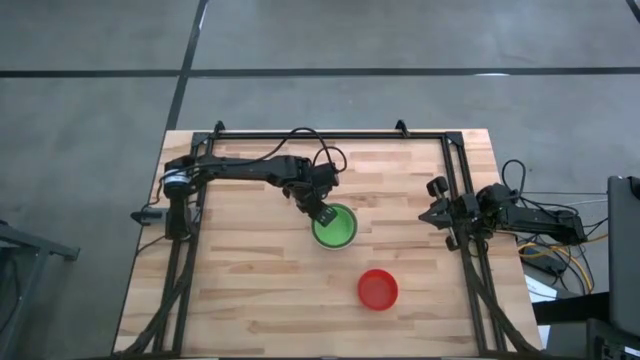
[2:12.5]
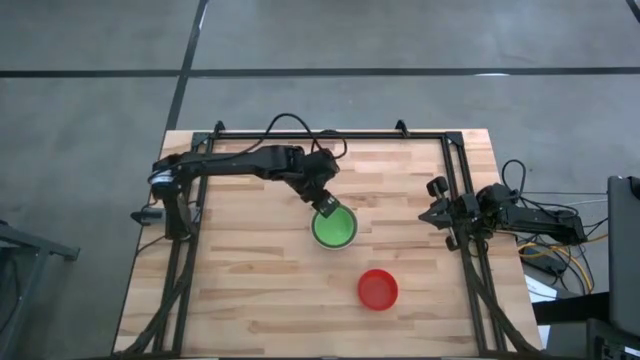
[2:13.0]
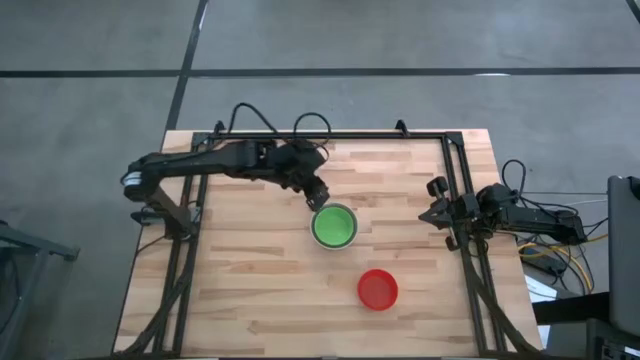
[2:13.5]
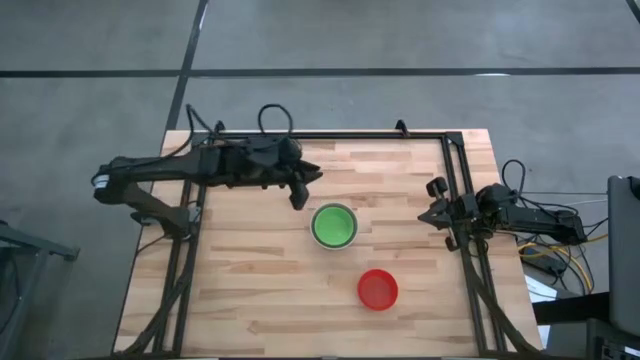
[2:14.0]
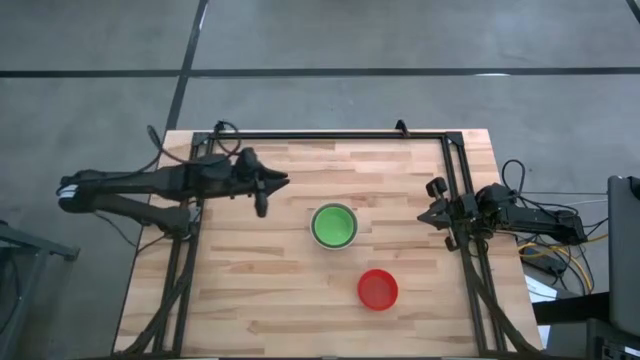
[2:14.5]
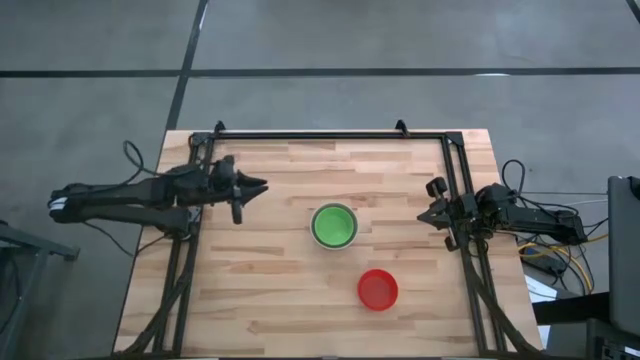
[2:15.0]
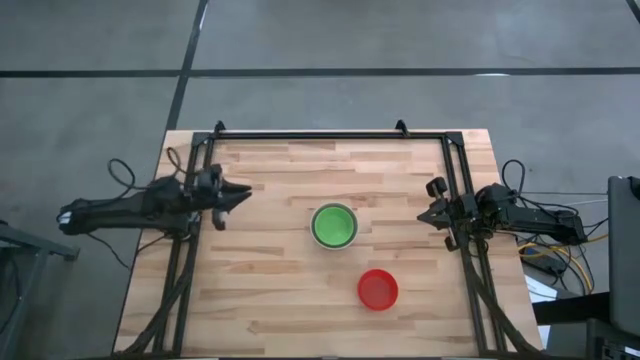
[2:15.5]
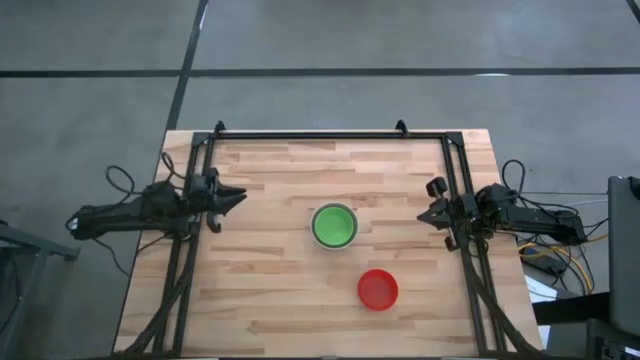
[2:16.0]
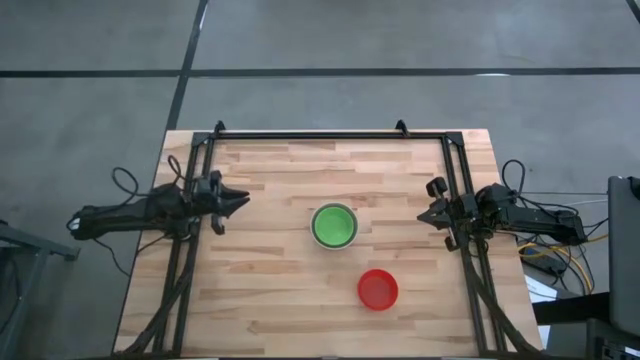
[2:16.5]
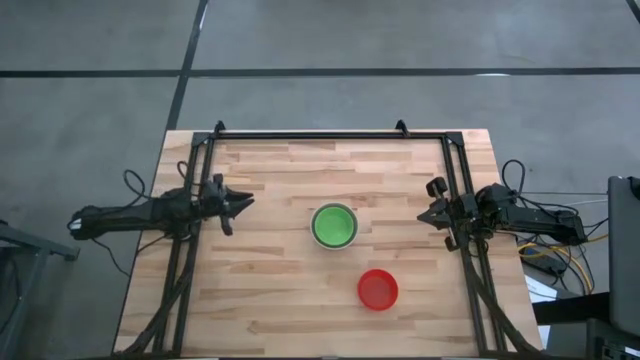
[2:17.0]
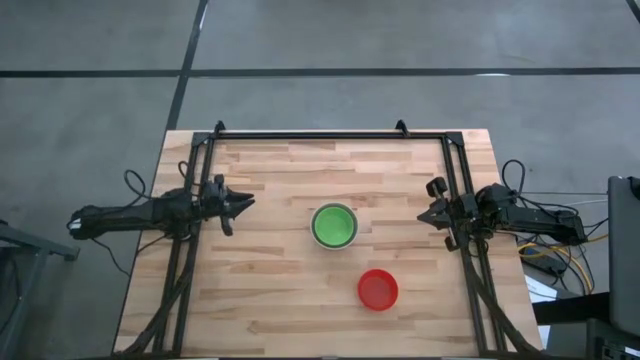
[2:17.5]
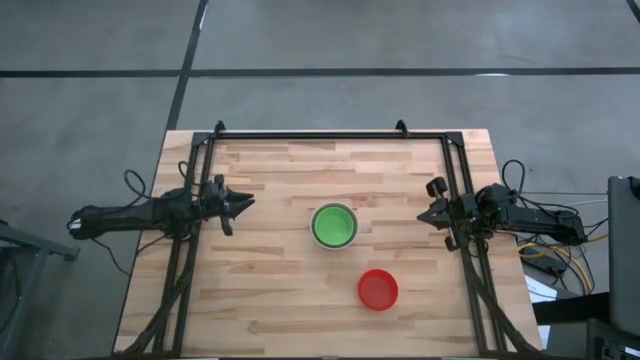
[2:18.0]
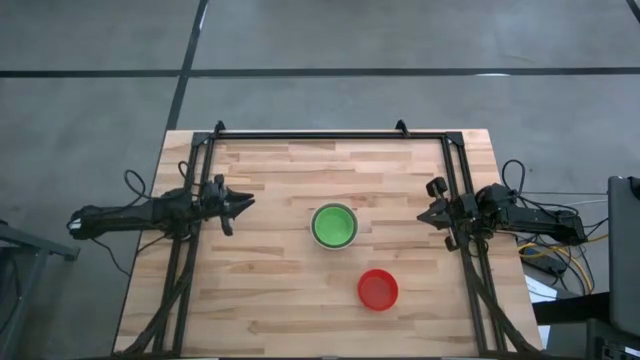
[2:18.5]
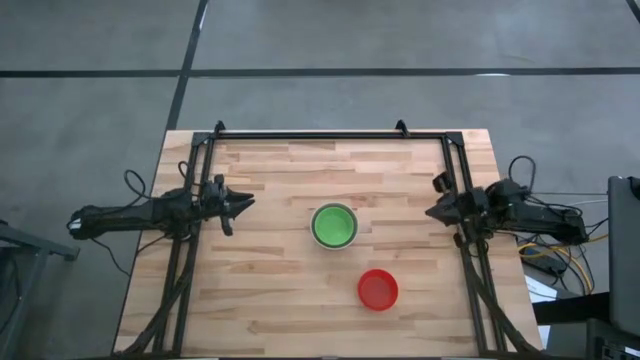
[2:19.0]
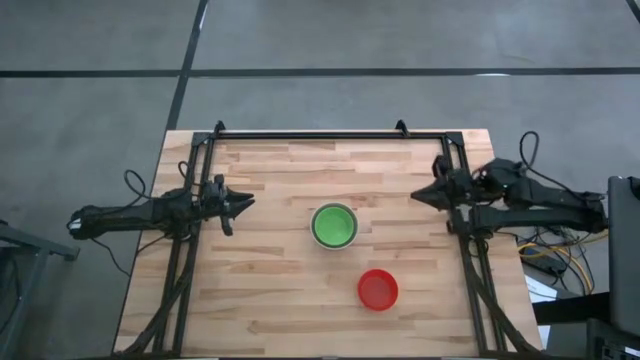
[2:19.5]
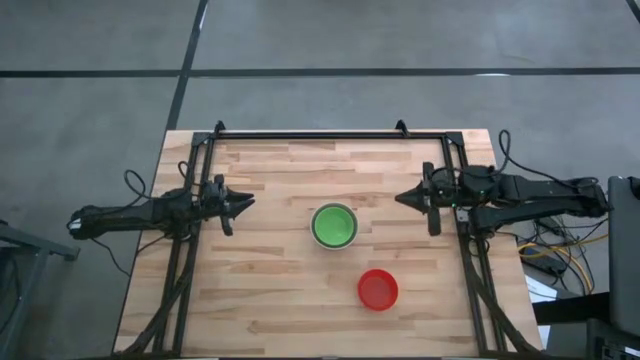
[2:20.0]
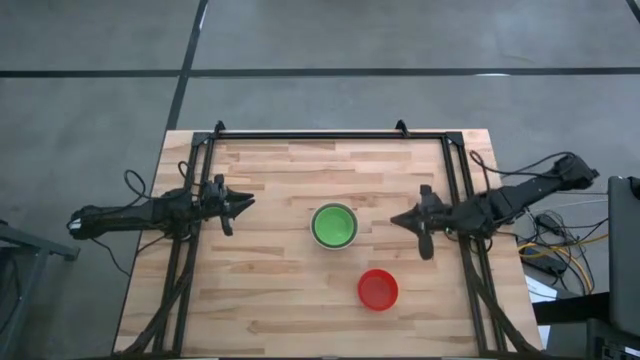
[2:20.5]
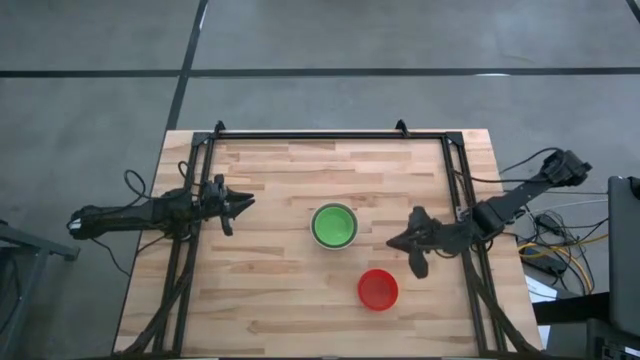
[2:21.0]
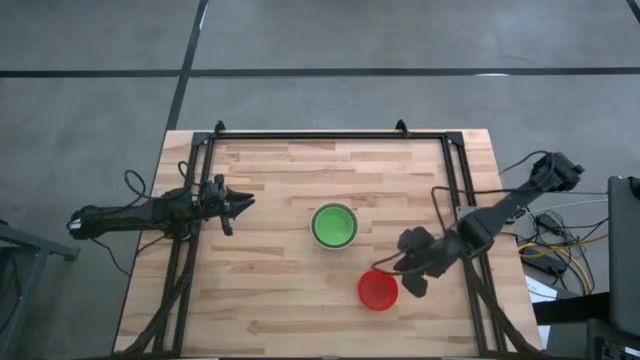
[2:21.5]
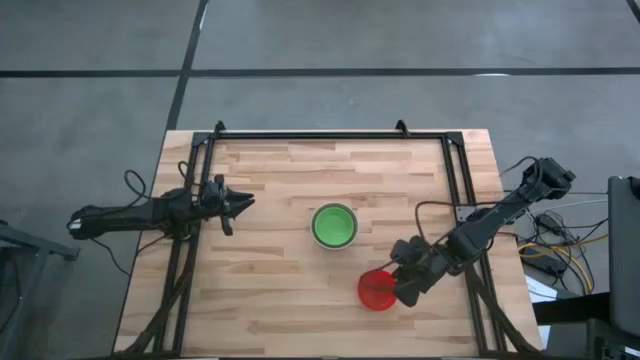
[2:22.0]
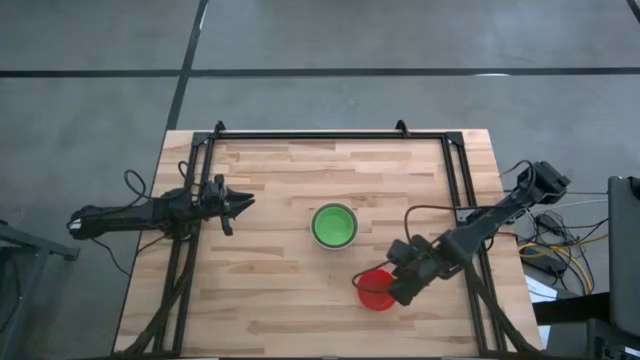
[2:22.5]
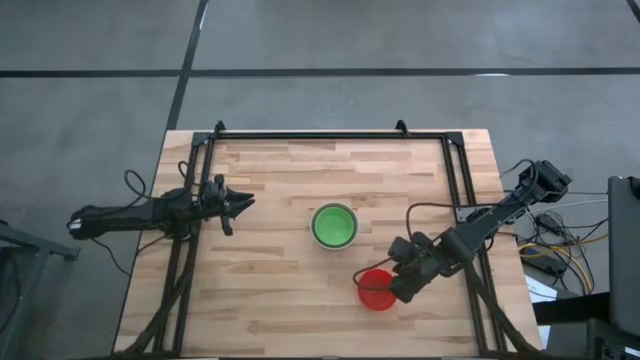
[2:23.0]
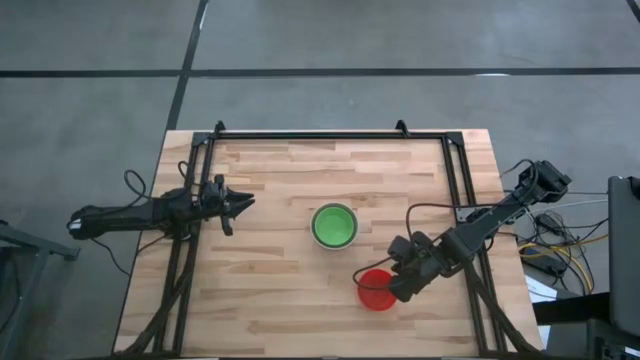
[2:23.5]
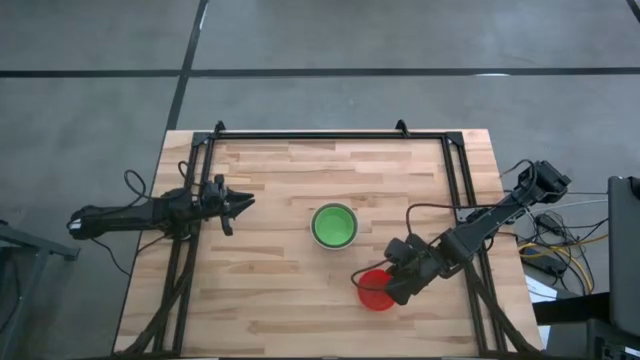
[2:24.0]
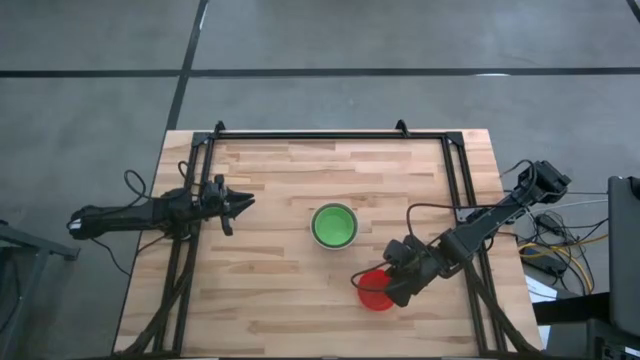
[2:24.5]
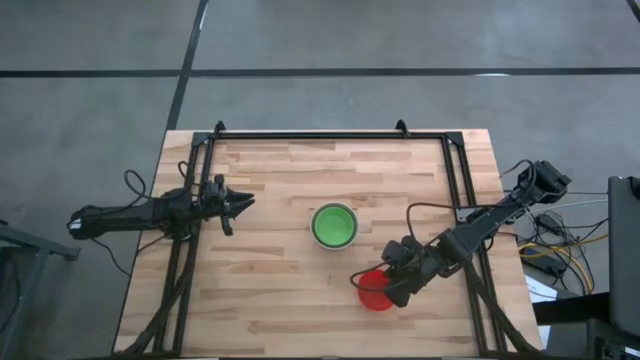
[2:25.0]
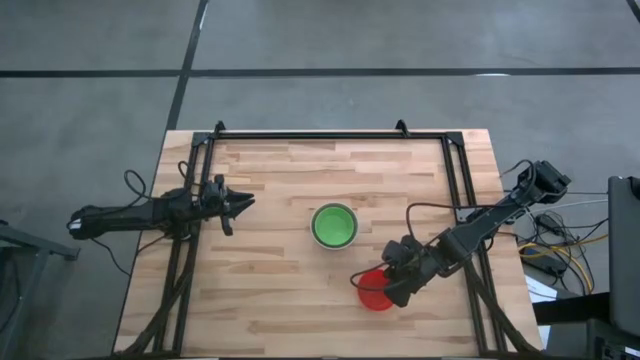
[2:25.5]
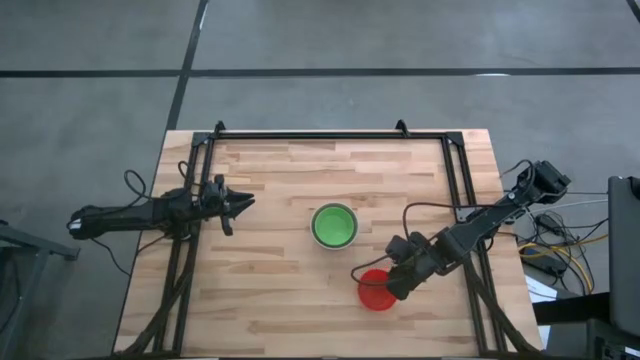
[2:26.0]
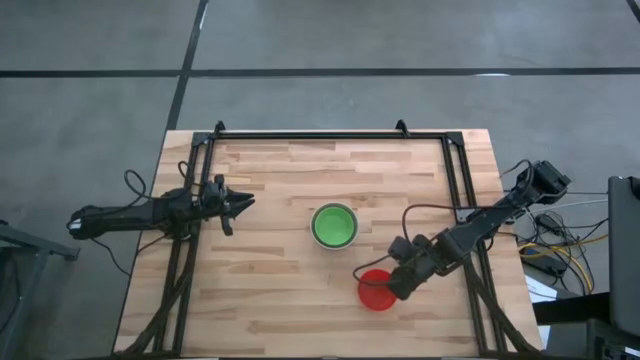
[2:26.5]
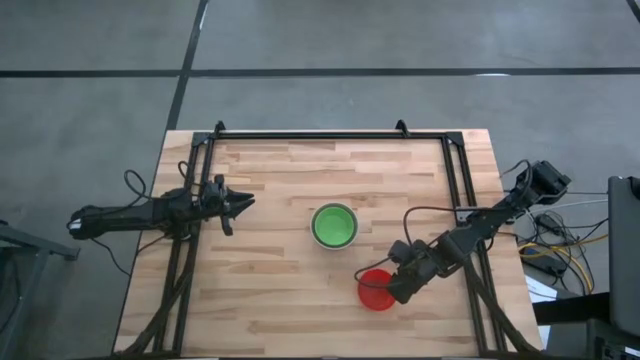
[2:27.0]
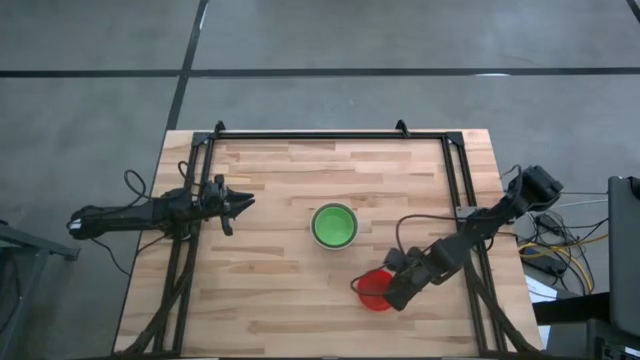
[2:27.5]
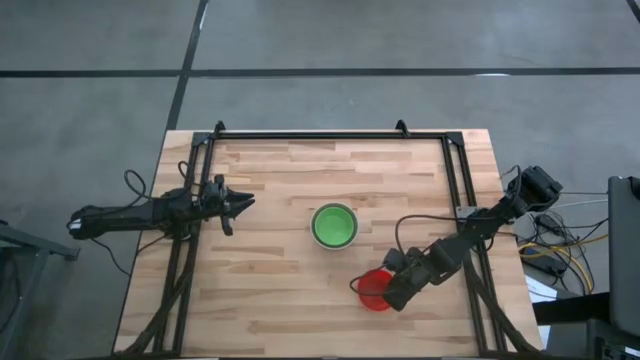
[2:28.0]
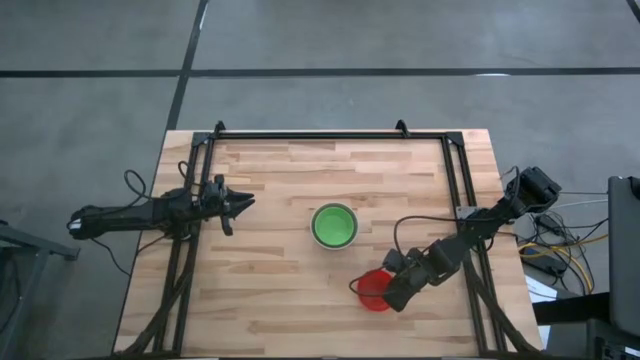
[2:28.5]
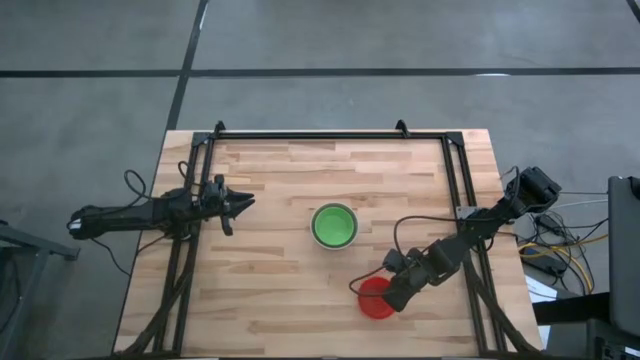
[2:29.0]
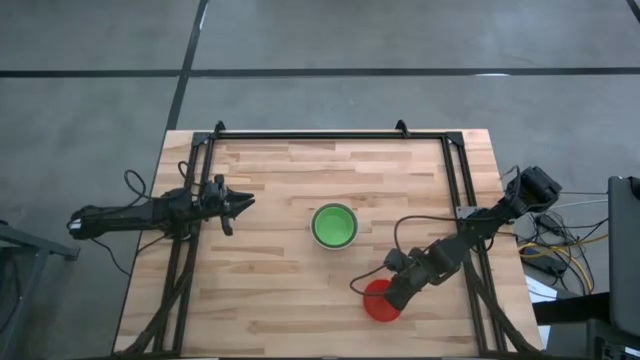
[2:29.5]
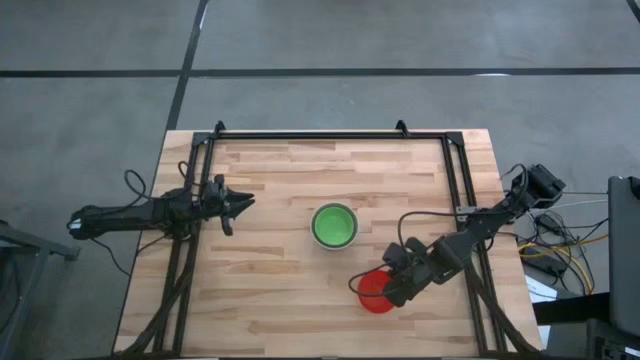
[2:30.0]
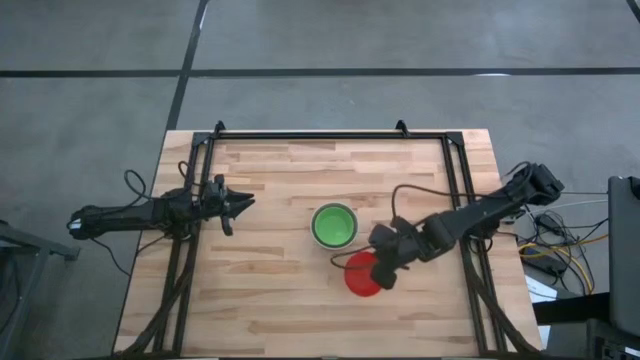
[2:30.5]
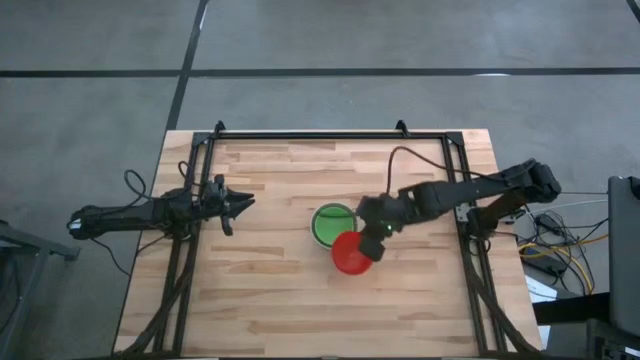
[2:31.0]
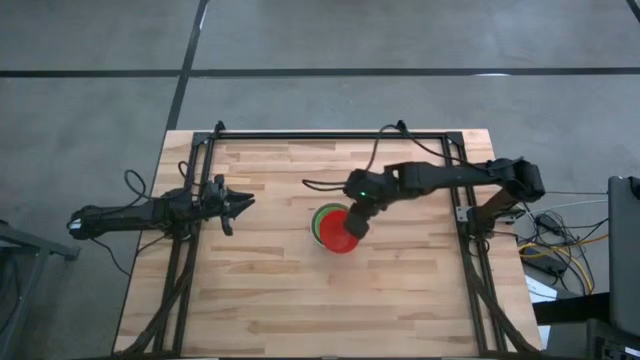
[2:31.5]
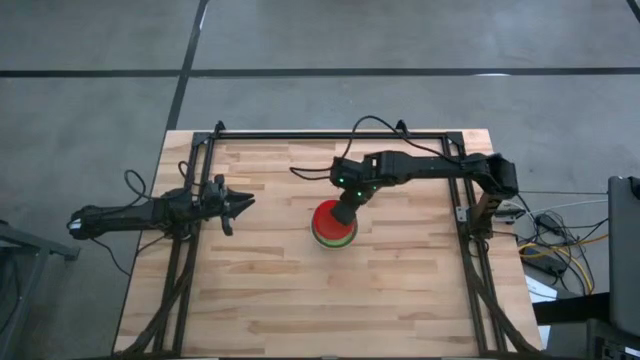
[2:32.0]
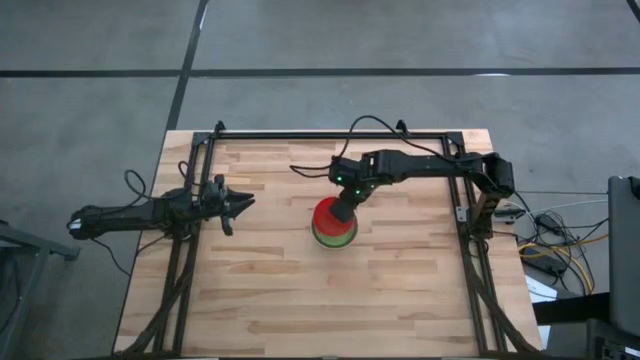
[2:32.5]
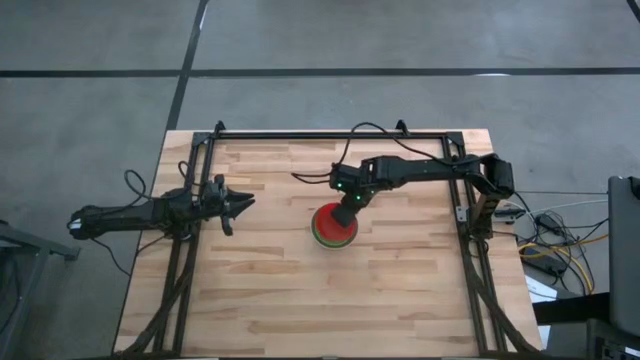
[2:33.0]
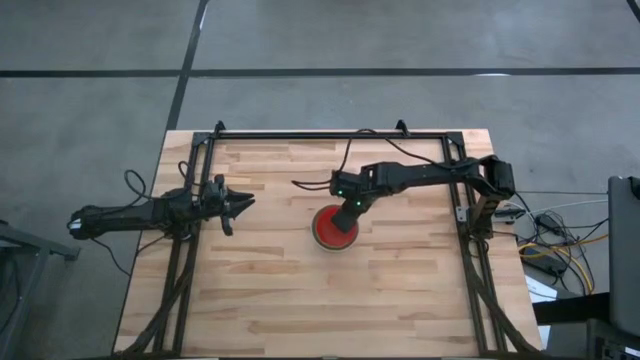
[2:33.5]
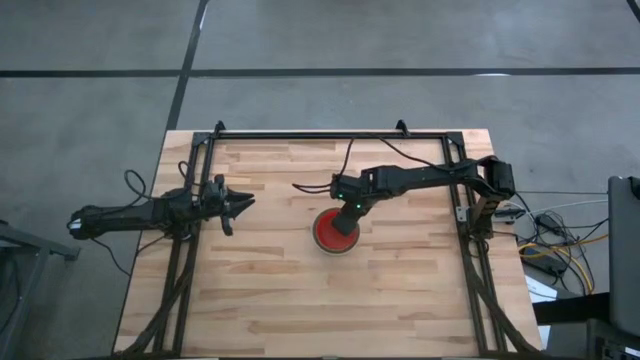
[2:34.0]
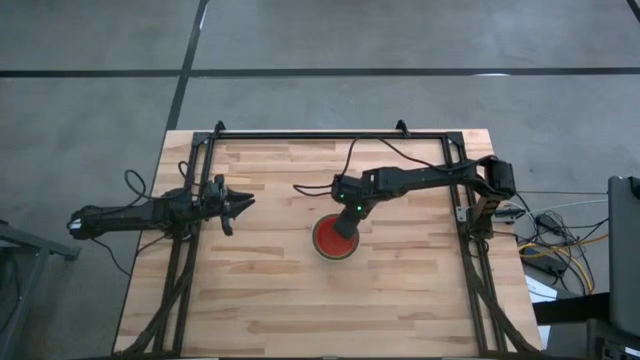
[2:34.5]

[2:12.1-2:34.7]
Stack the red bowl on the green bowl
